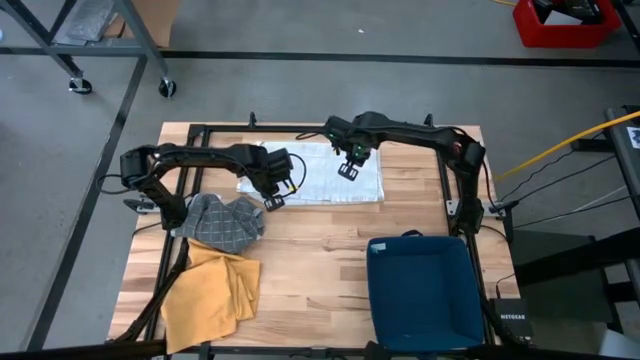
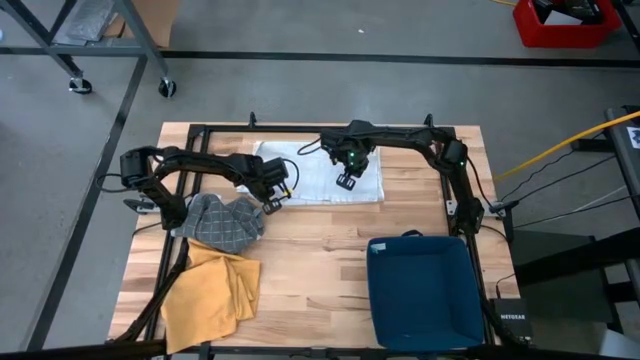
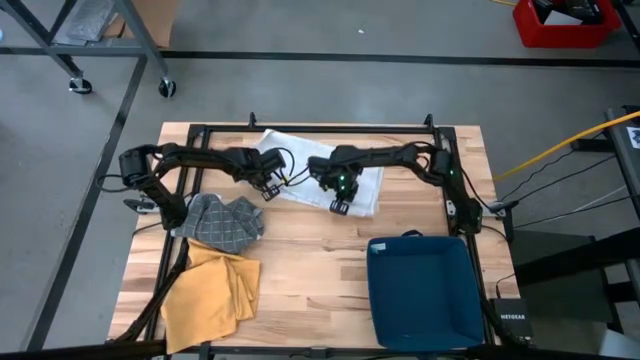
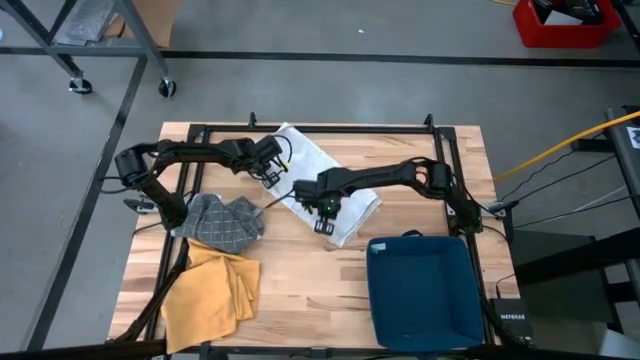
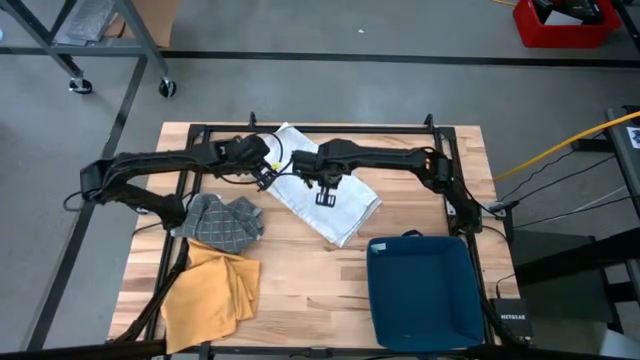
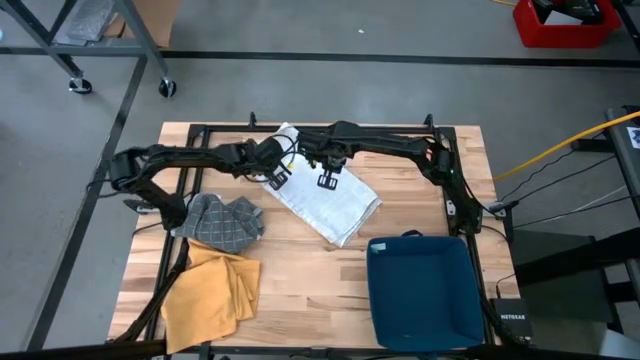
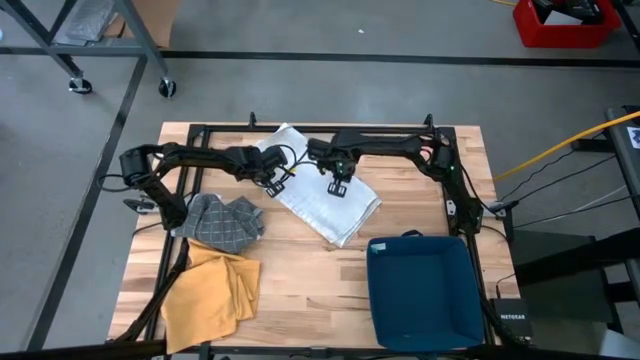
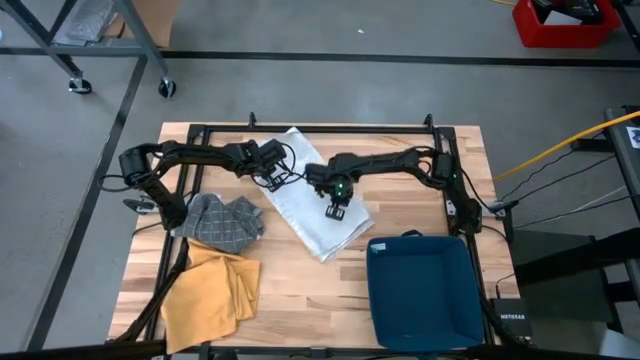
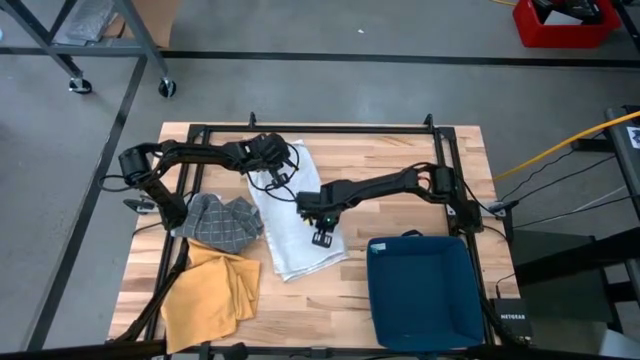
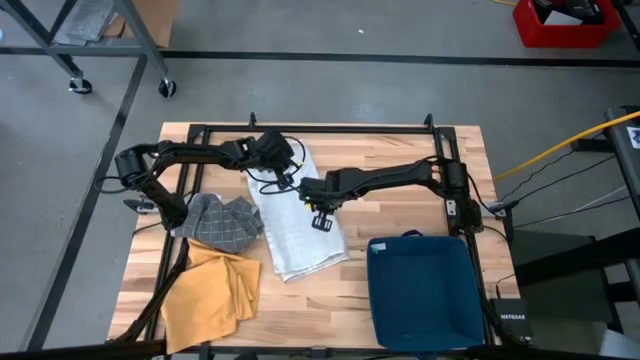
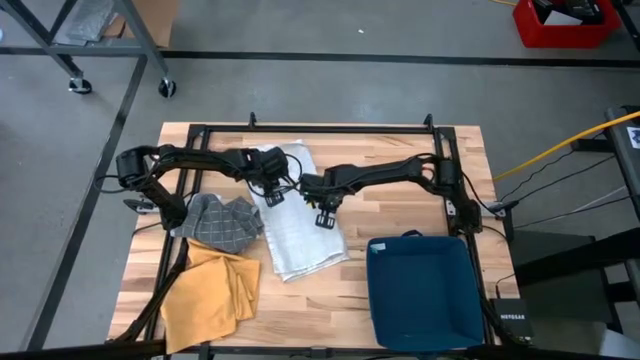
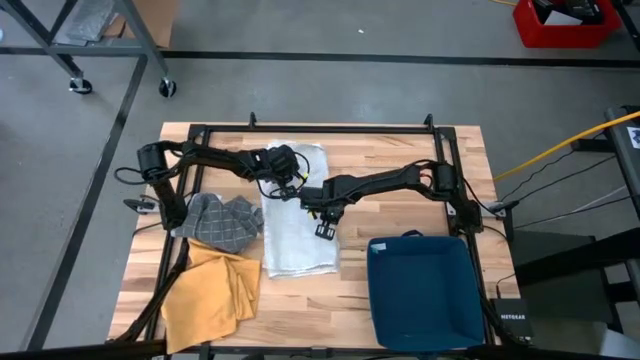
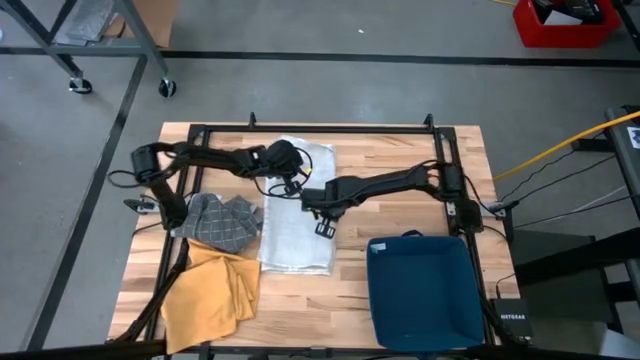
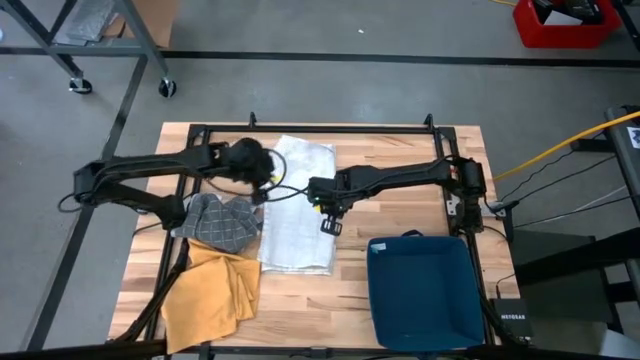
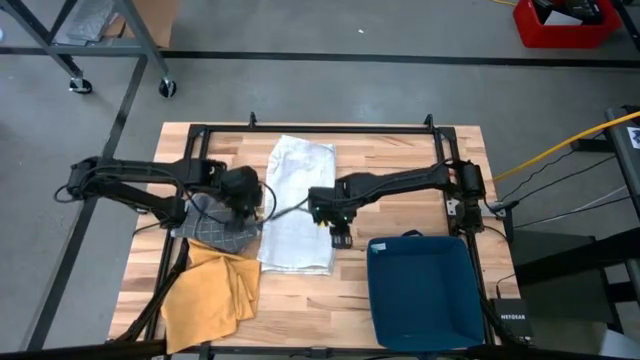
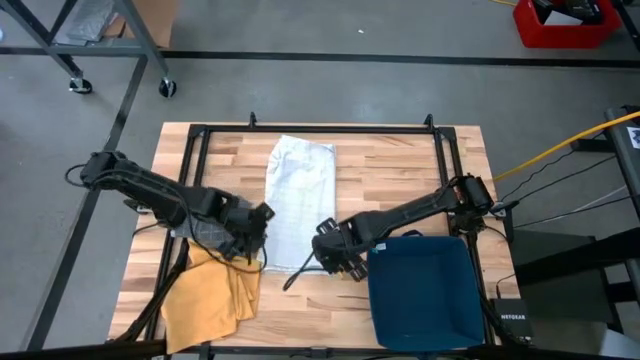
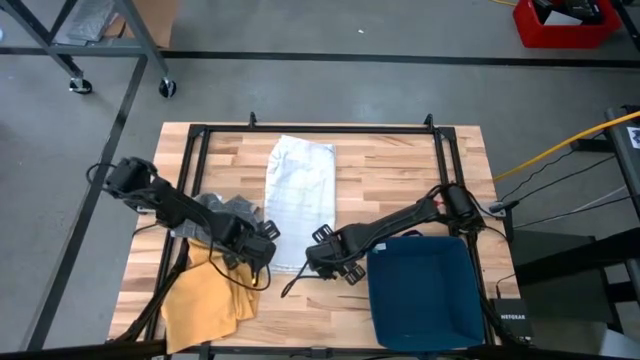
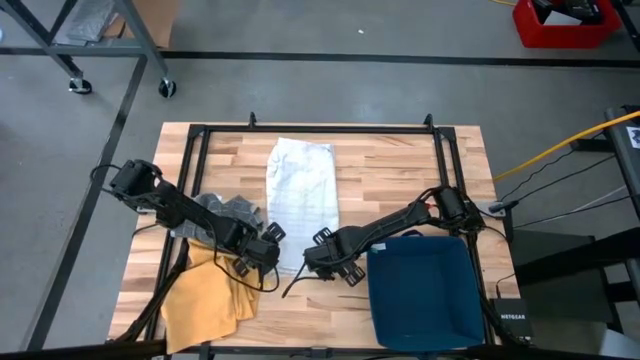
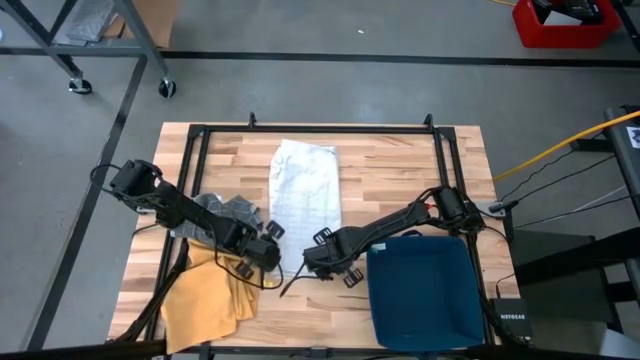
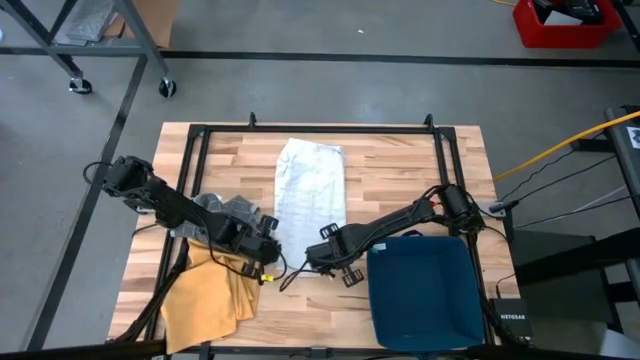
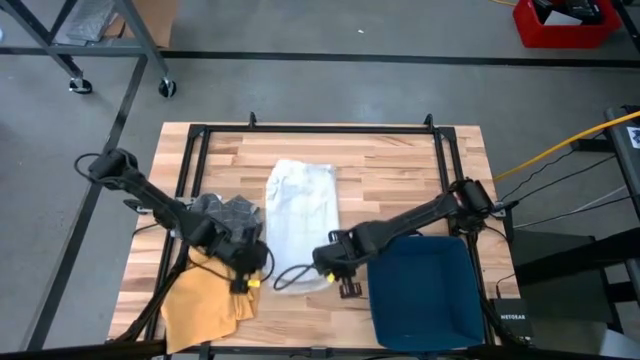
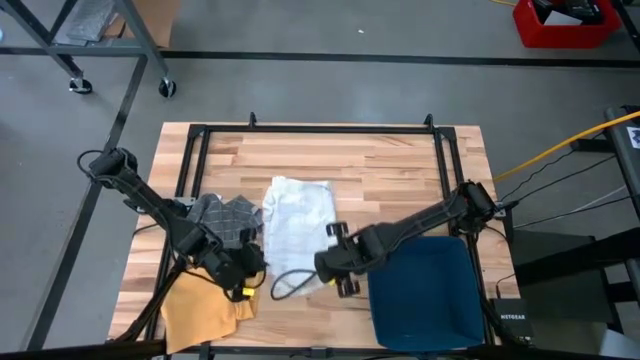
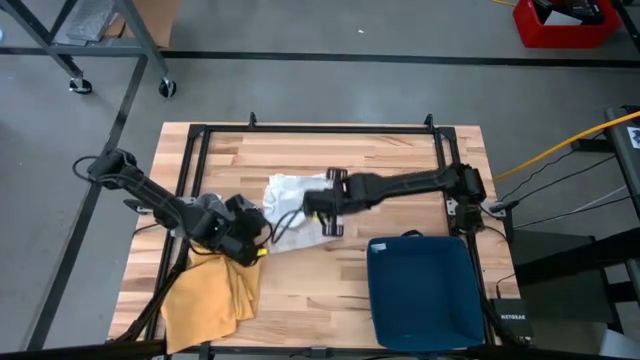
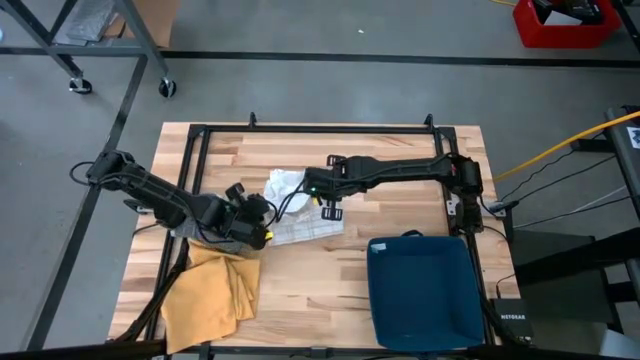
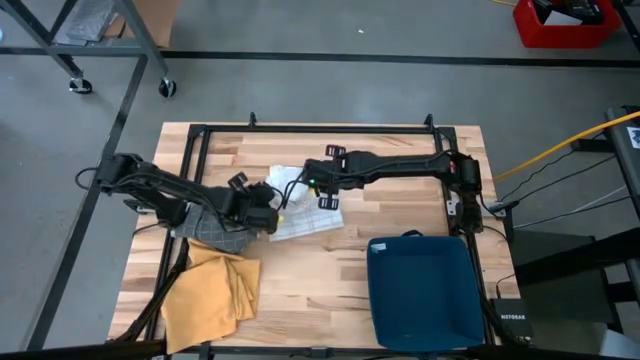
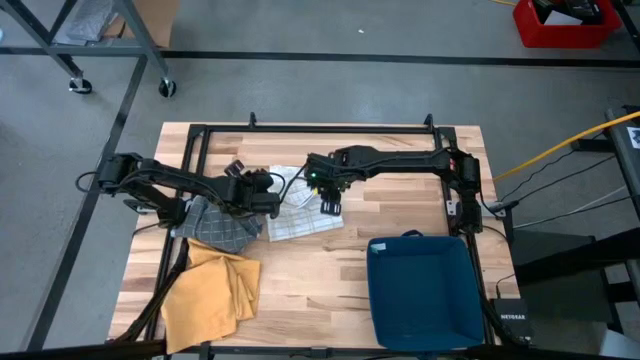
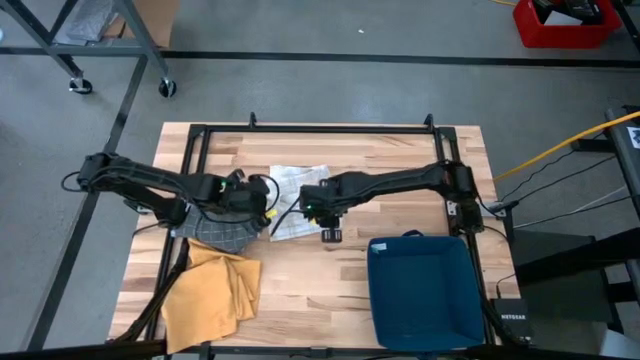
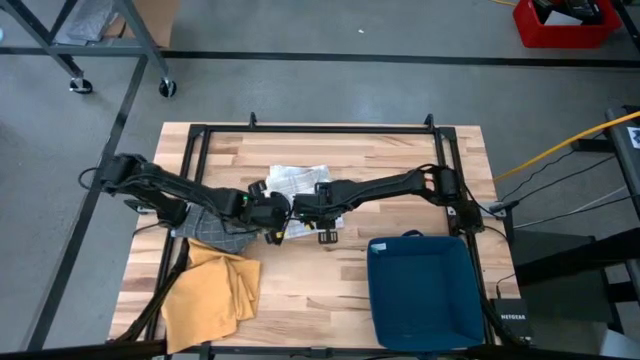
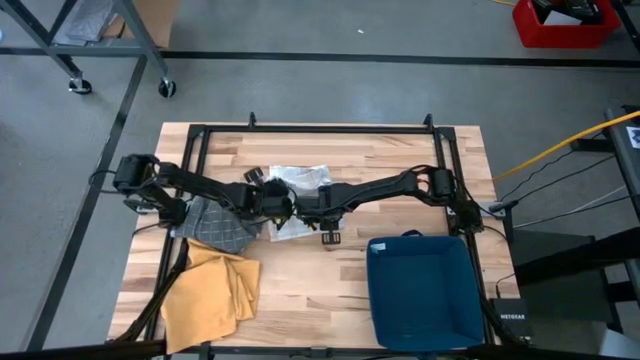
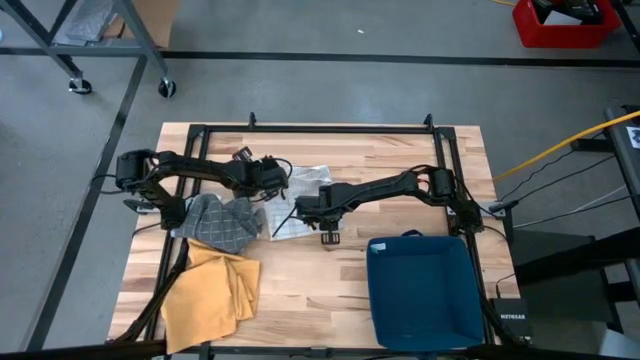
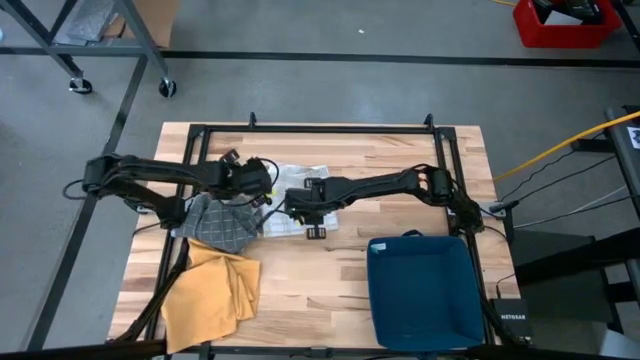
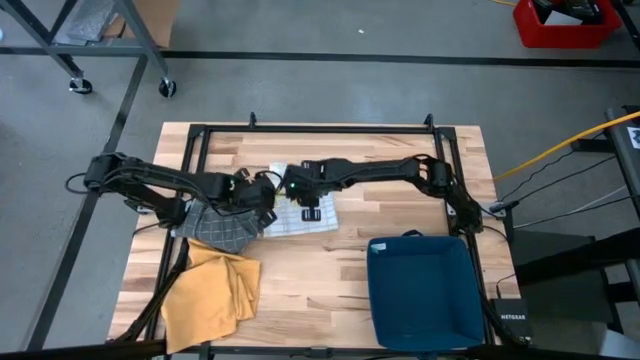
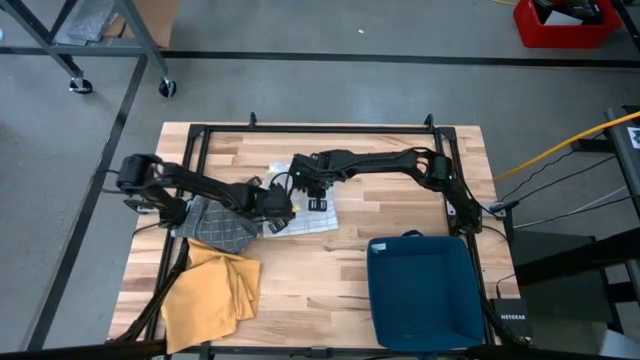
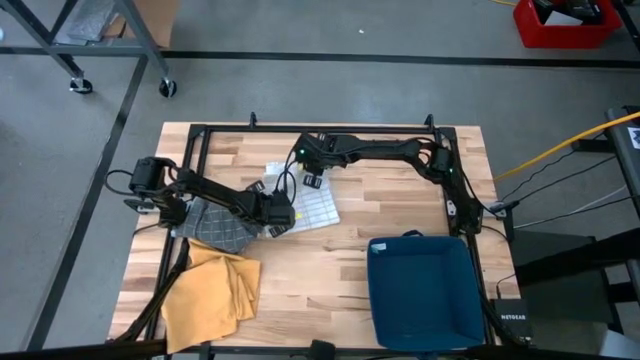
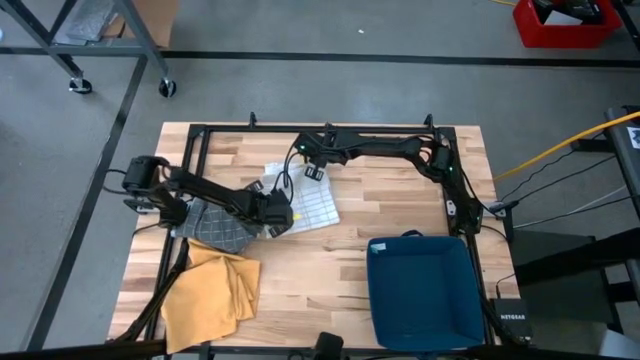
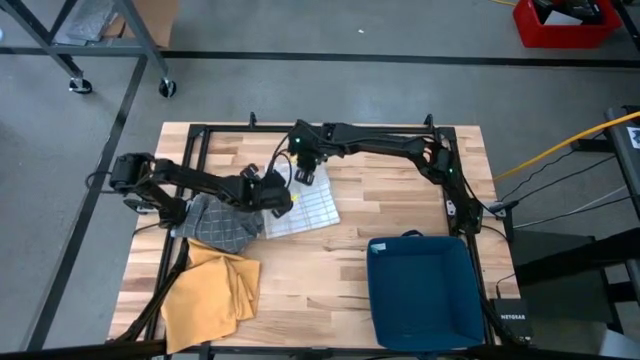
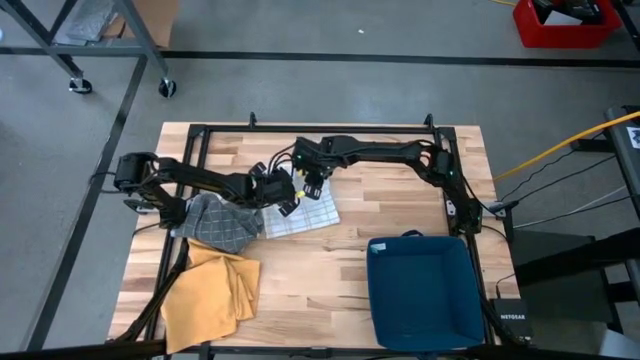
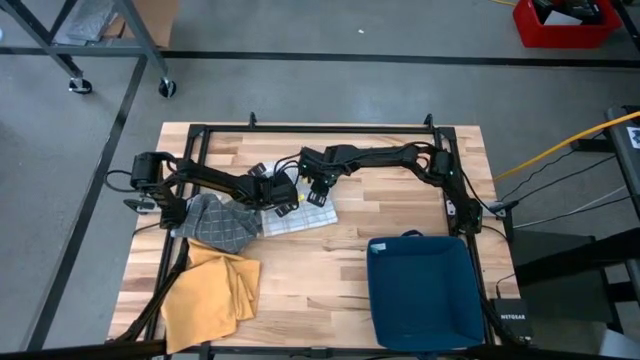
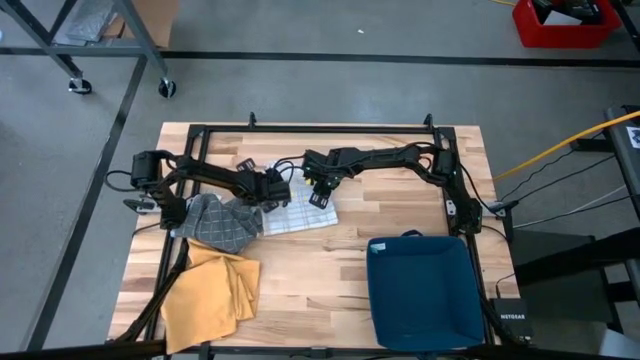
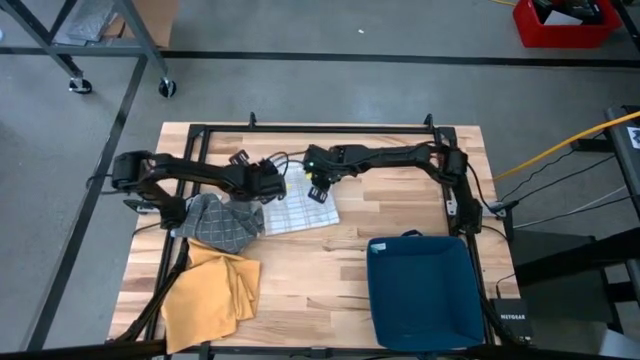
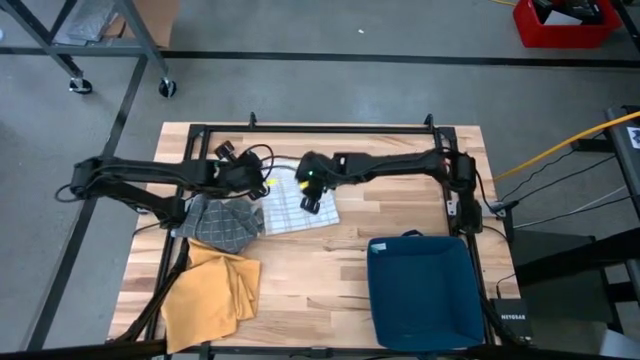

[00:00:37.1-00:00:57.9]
Task: Fold towel
Fold the white towel

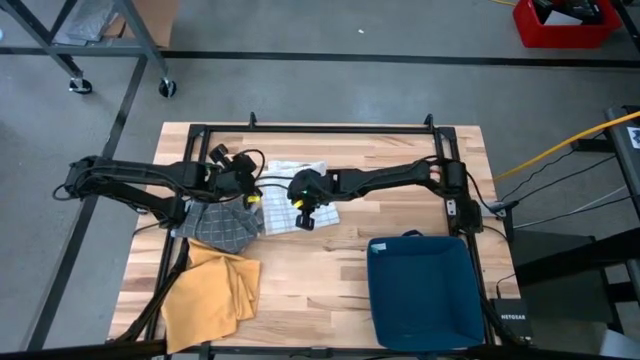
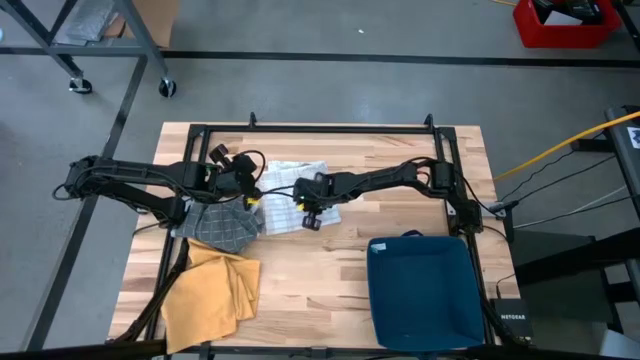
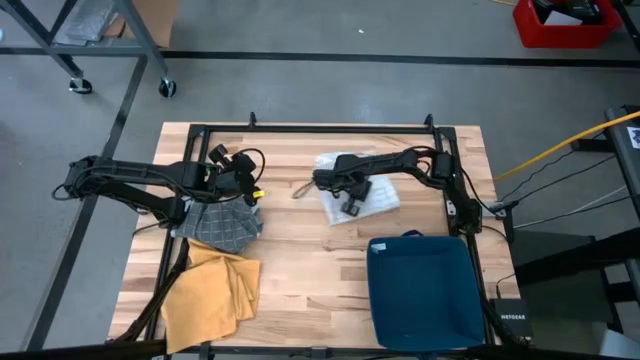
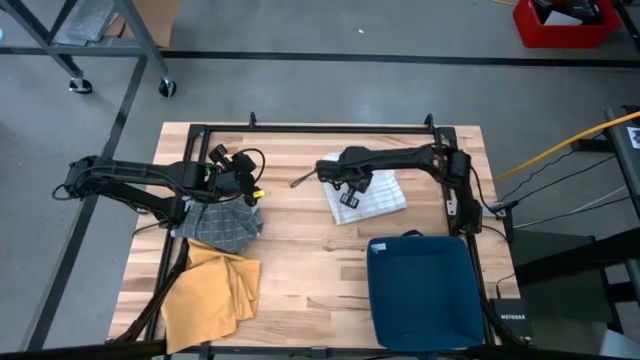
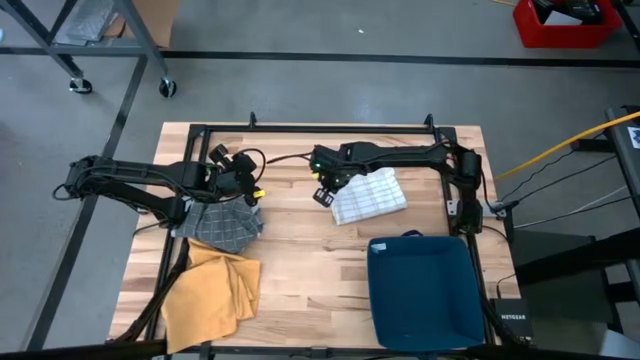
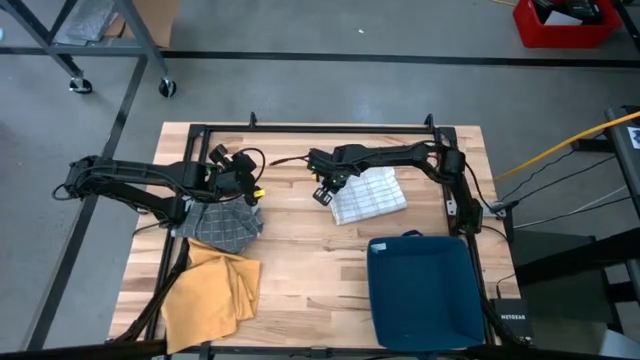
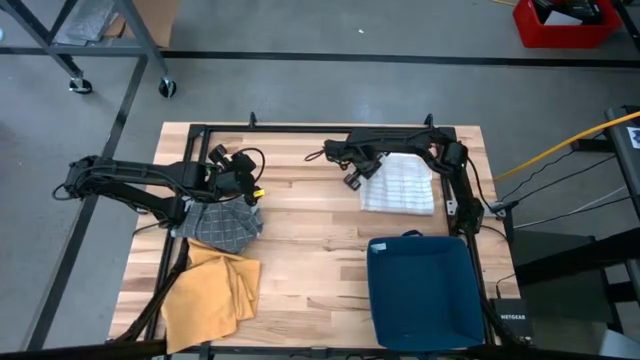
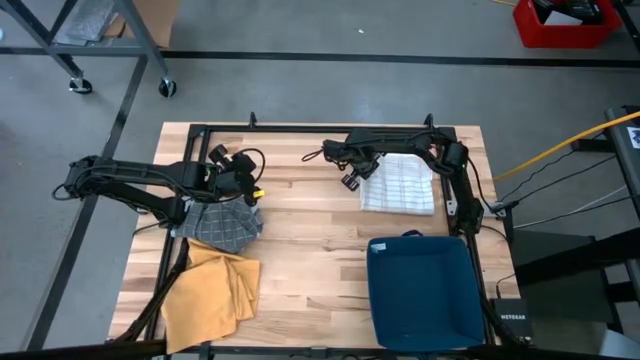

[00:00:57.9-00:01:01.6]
Move the white towel to the top right of the table
